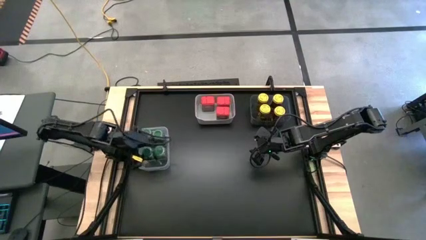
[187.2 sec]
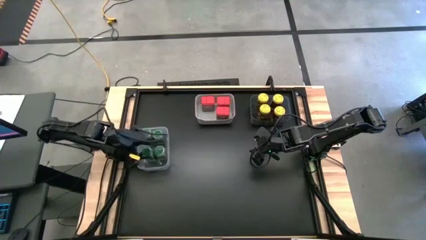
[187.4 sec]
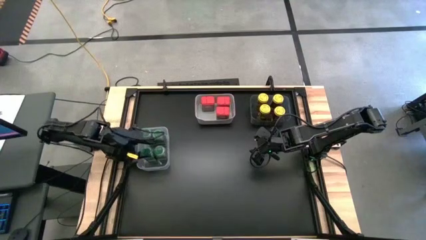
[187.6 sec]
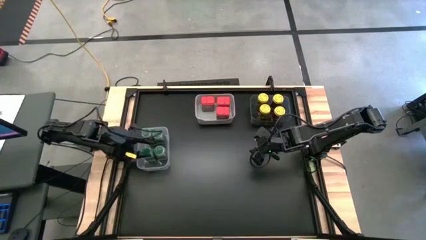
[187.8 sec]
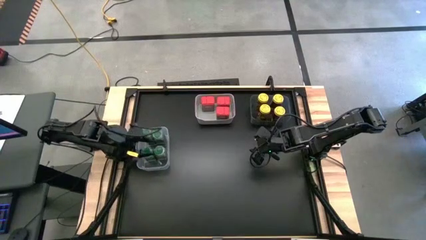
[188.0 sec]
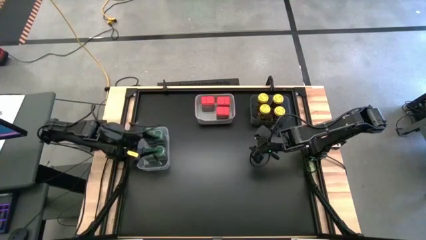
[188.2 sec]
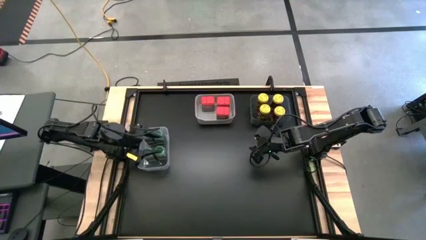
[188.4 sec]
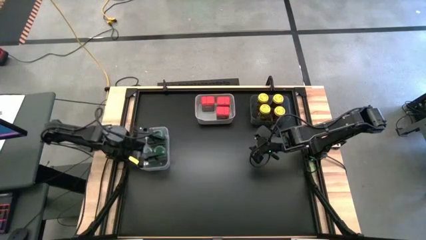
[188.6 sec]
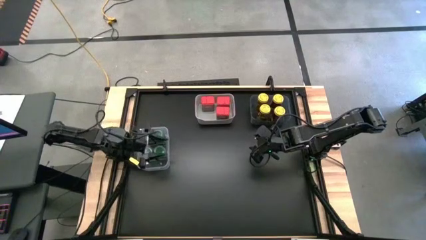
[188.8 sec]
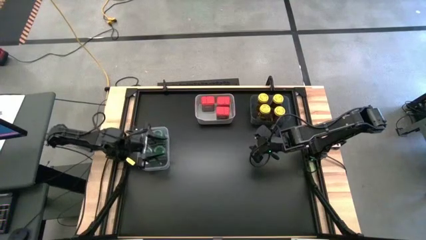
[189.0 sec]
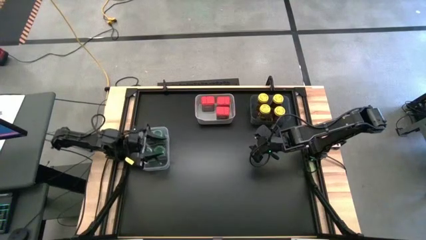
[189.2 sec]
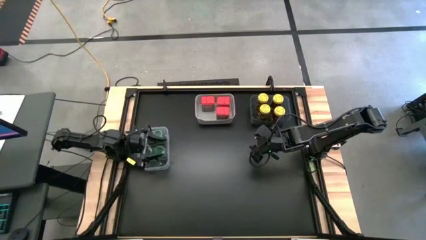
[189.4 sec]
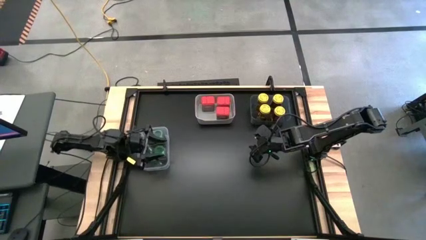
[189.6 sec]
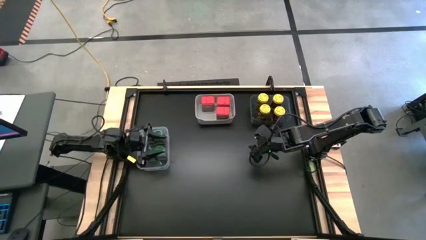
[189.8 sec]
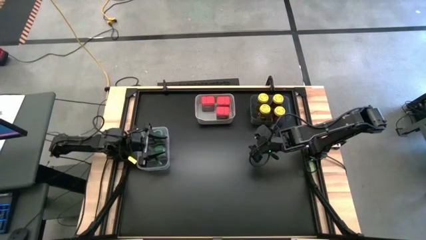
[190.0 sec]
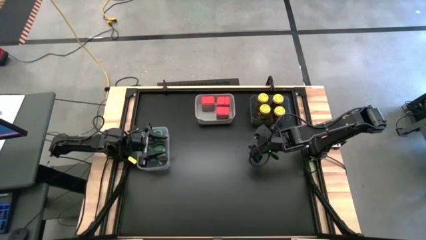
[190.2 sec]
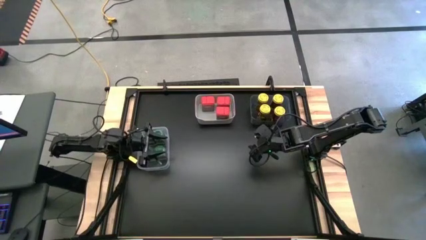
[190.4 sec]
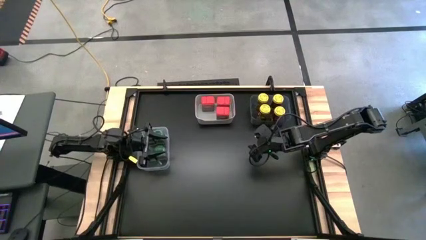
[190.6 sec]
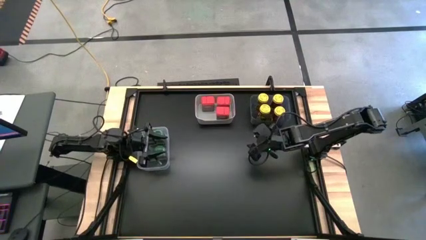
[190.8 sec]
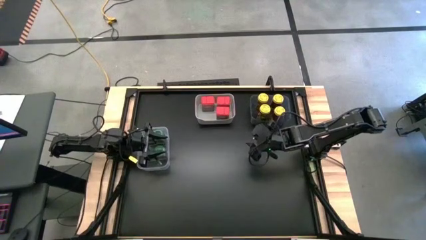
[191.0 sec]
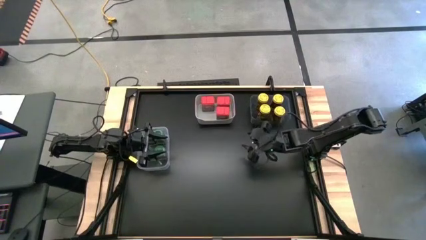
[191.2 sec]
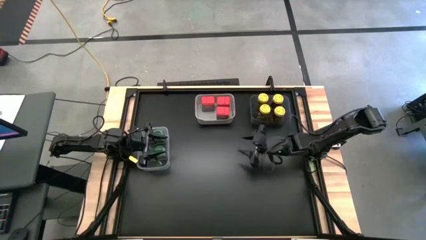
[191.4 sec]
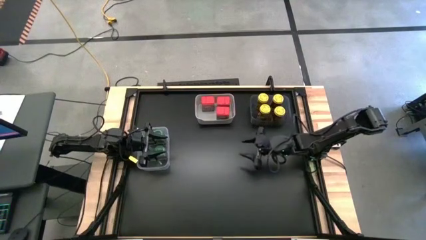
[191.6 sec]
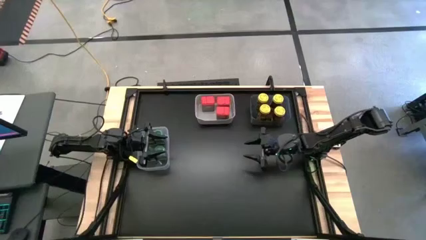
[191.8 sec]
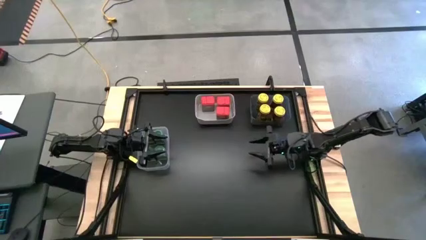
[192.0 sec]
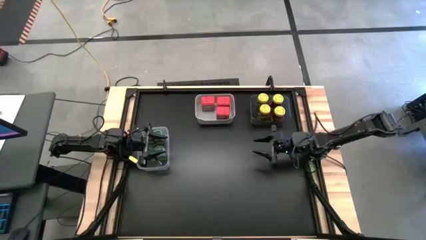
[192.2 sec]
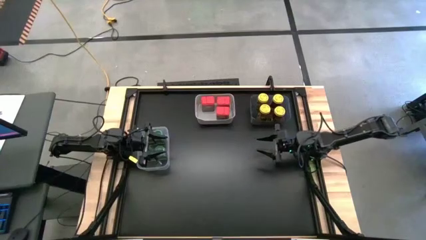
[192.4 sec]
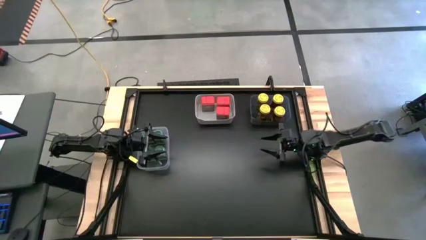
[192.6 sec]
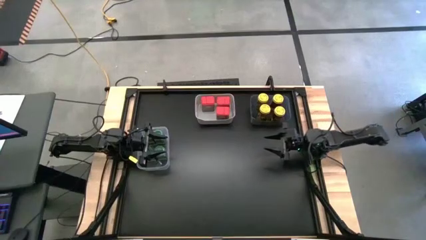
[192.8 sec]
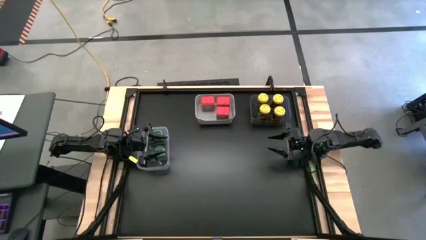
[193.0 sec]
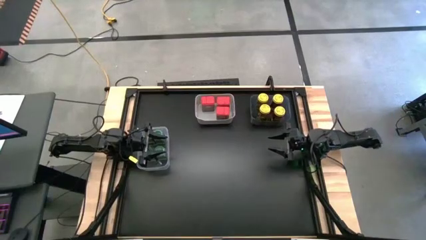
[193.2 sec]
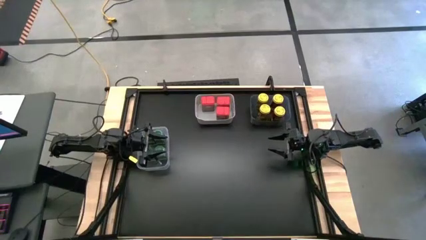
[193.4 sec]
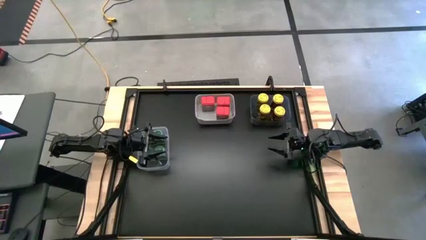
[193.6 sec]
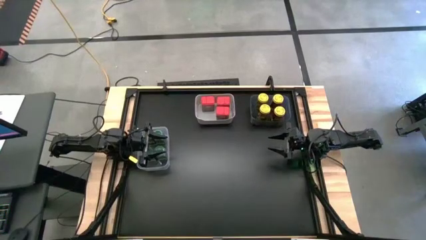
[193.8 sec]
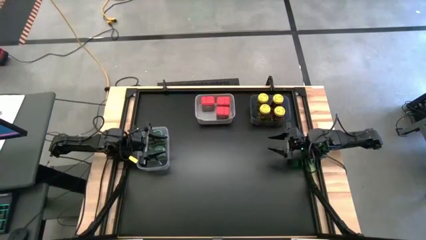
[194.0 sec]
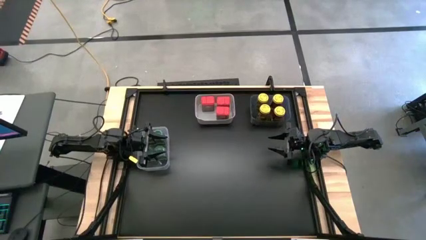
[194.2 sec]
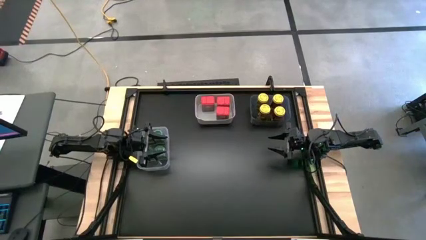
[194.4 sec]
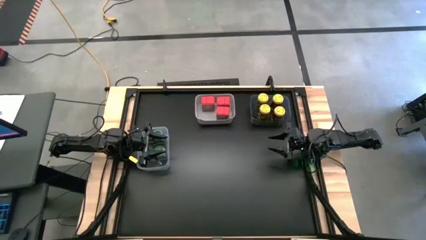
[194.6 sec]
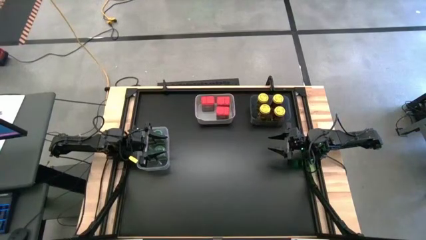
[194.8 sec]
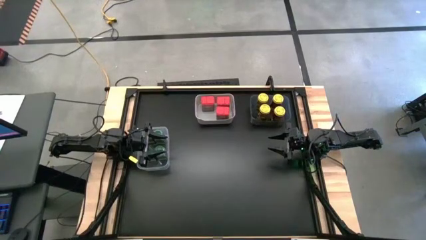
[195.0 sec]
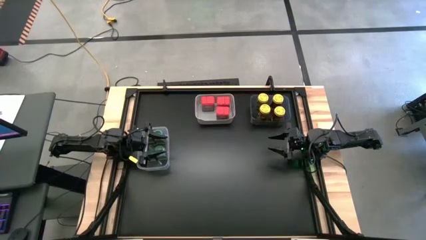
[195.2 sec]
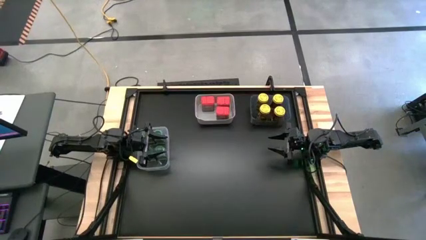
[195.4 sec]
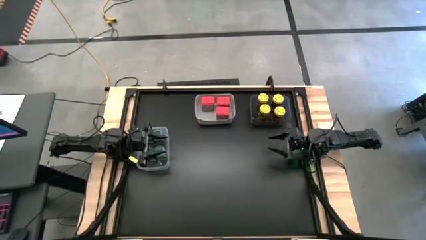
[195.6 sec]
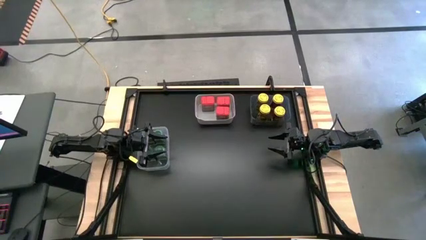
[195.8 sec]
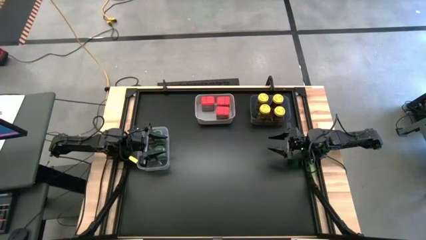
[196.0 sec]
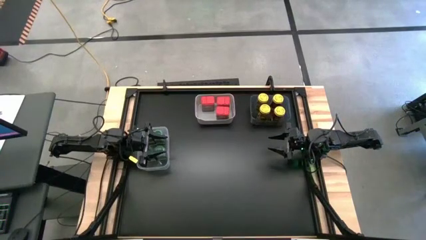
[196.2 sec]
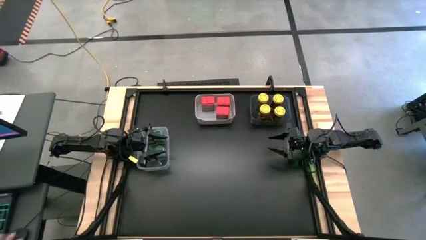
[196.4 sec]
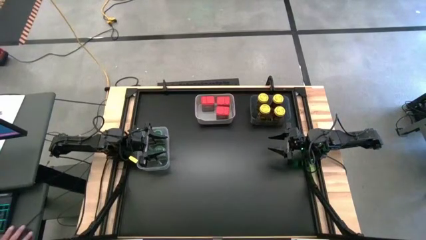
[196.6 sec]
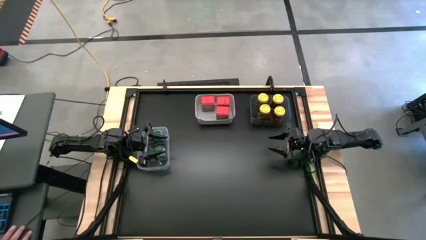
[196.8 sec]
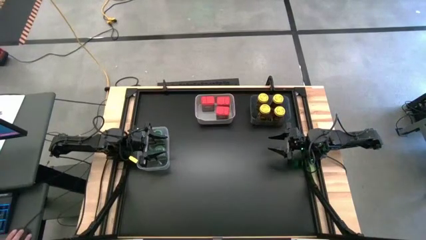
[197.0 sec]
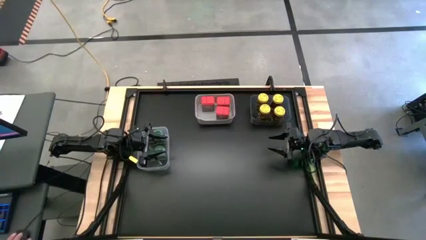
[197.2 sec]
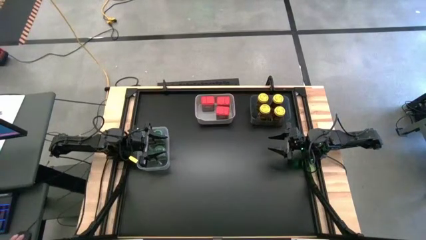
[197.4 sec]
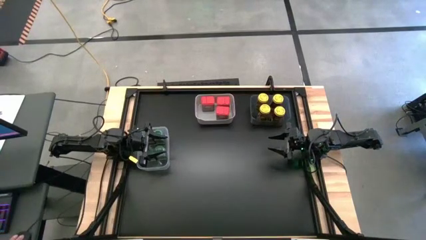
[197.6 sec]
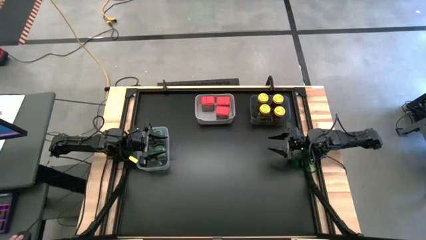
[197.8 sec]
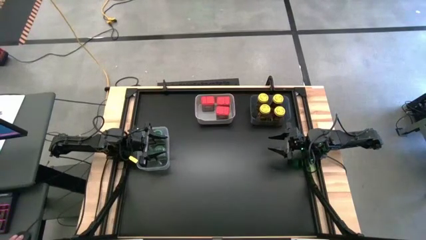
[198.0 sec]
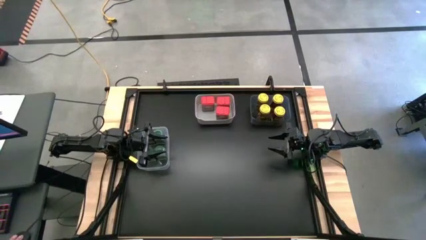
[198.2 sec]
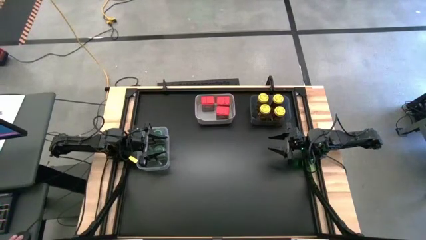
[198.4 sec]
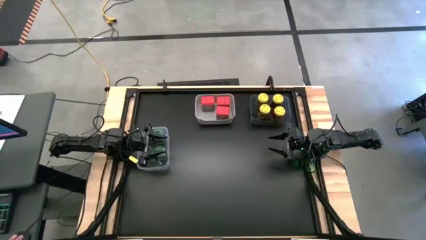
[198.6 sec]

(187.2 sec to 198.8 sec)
Task: Sort spices by type
Return to Home Position

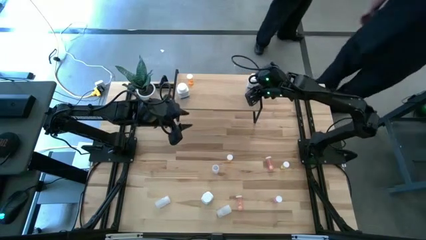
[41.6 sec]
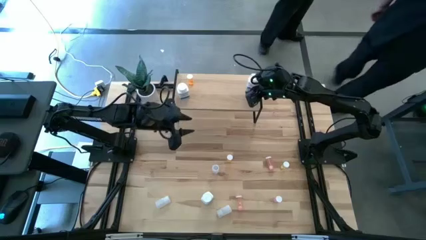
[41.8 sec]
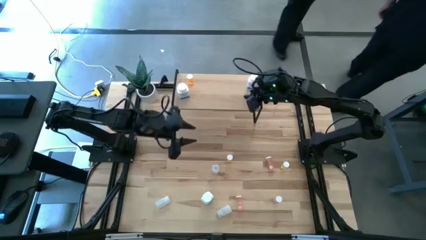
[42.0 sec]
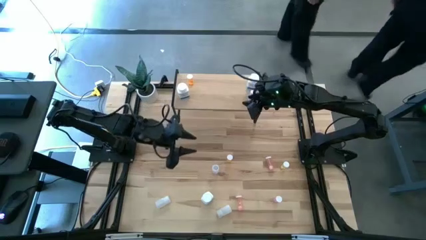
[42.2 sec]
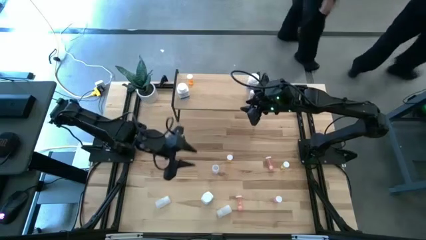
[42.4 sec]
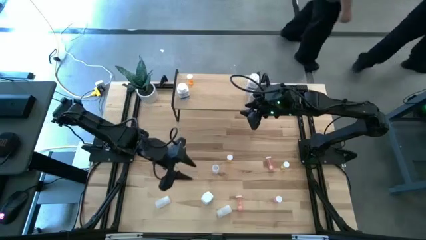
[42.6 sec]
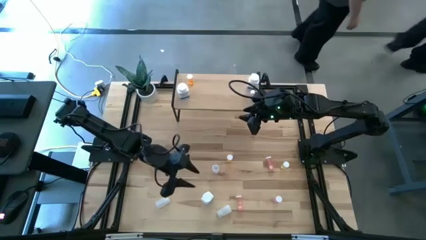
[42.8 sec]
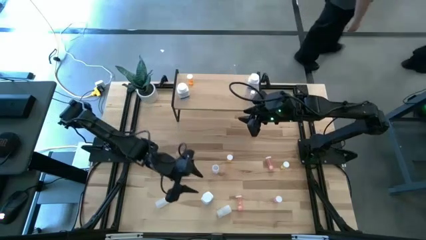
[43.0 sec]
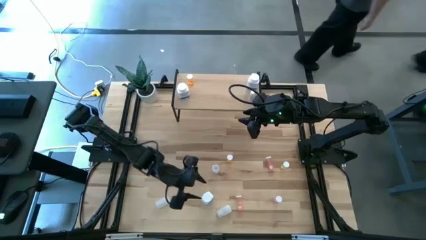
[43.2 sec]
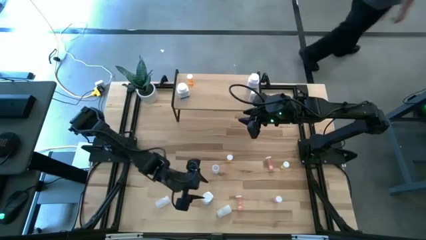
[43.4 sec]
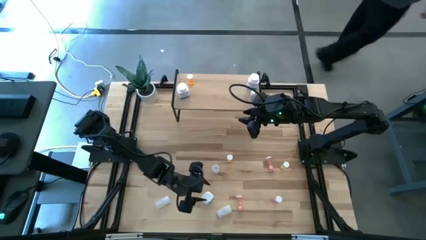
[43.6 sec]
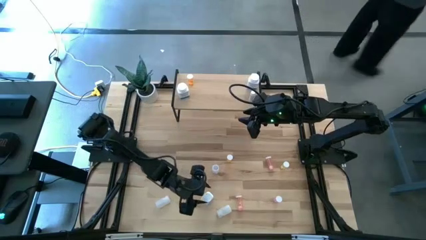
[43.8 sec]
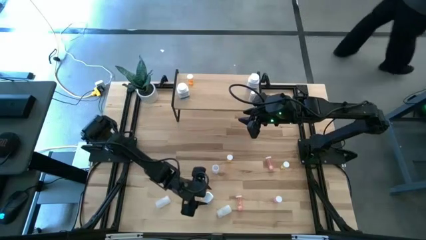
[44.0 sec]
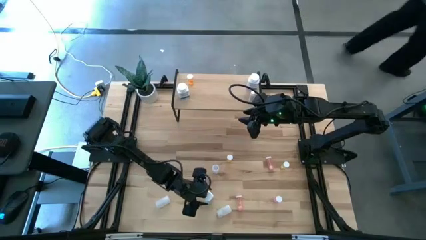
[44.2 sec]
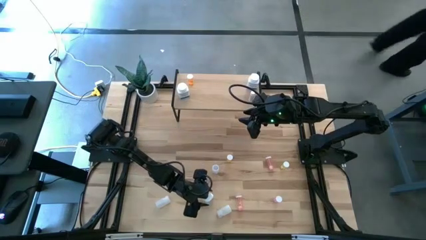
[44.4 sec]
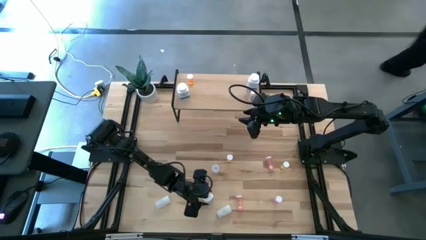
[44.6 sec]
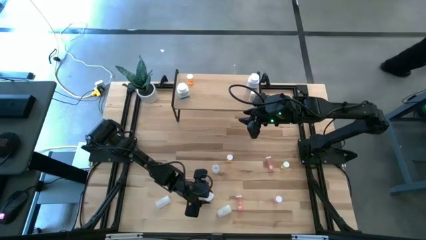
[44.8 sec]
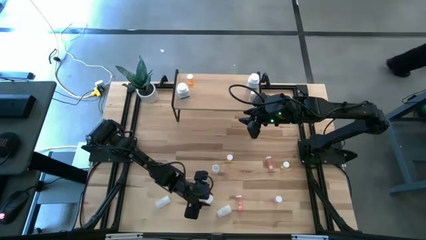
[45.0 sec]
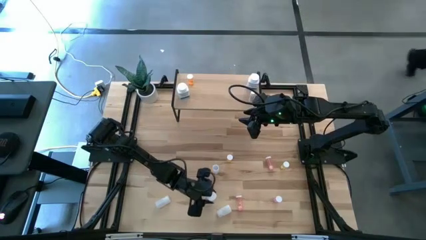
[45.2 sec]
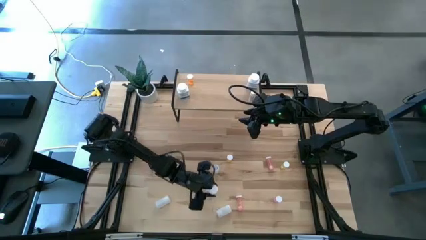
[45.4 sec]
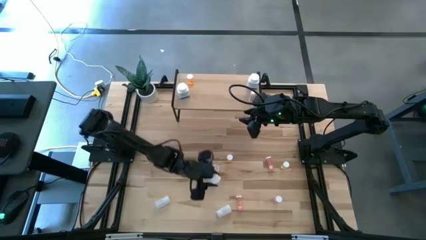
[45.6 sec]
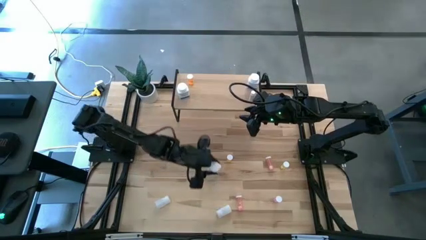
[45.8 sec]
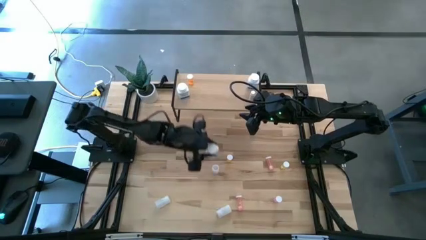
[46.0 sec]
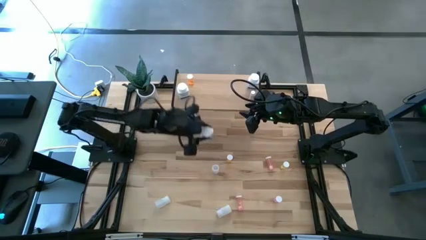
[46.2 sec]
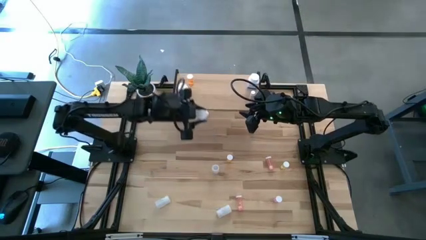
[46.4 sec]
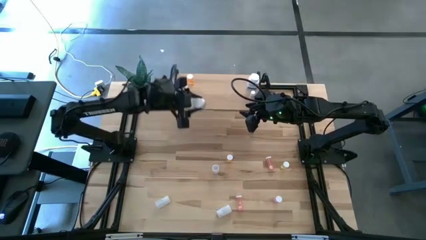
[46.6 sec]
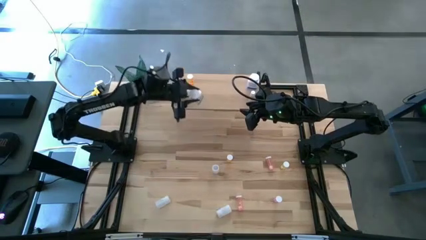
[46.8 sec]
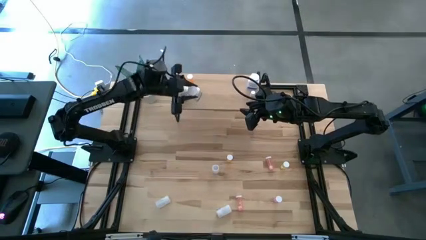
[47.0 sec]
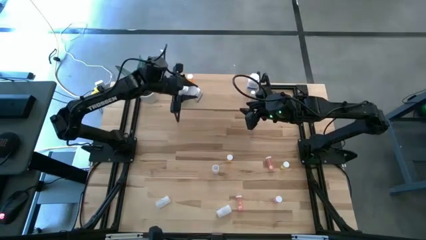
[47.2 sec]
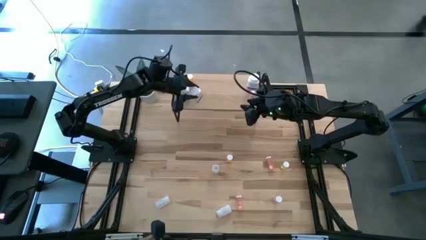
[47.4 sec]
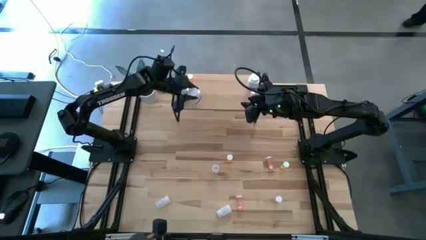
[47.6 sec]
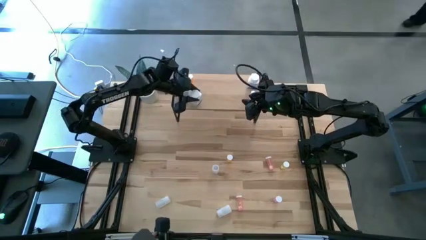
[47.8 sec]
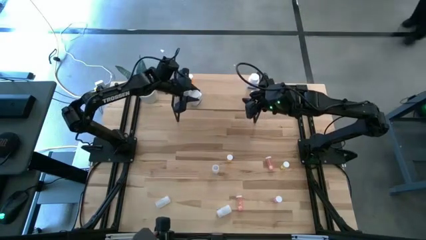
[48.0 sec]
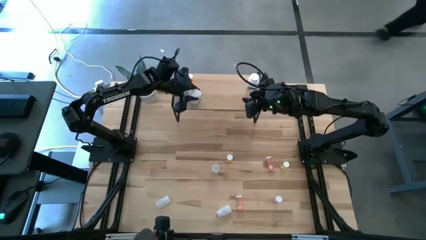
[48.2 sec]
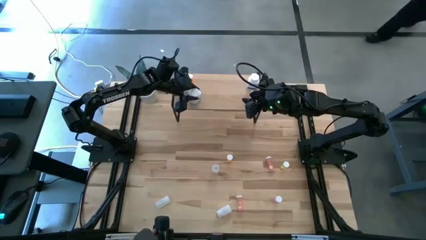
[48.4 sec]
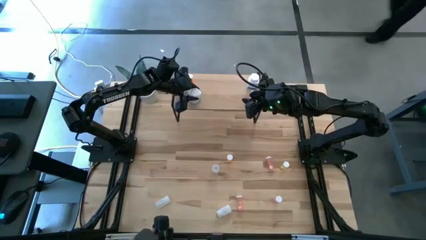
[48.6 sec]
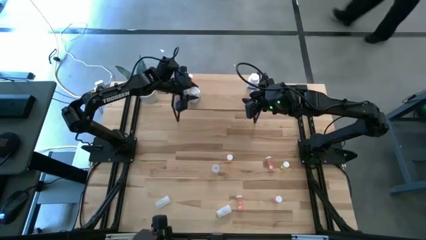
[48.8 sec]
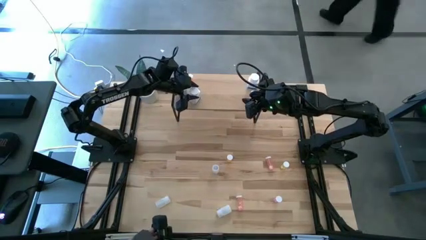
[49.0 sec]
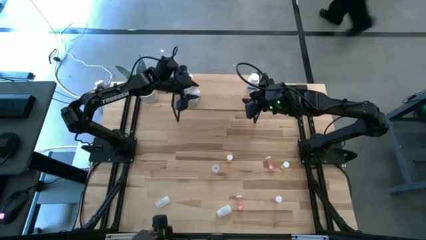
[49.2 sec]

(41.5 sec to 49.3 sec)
Task: Pick and place medicine bottles onto shelf by color
Put the white supplement bottle on the shelf
